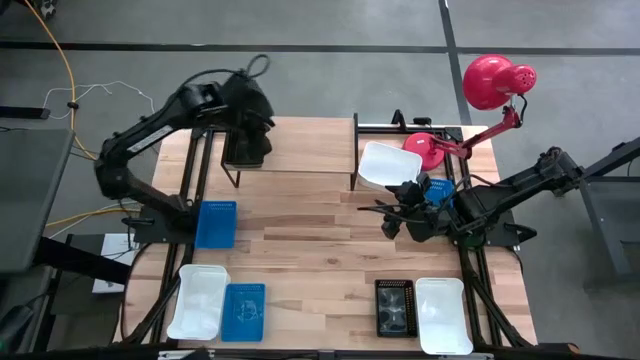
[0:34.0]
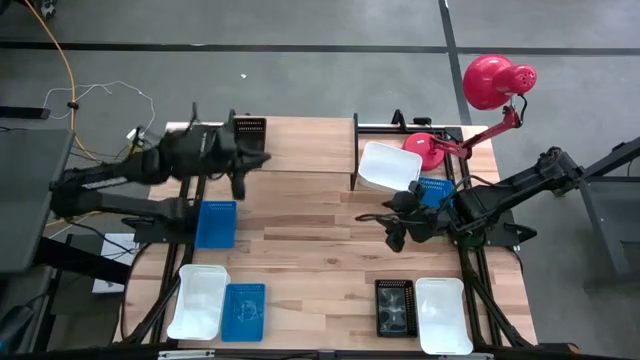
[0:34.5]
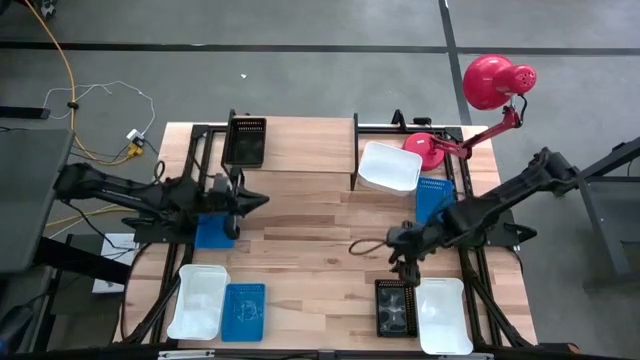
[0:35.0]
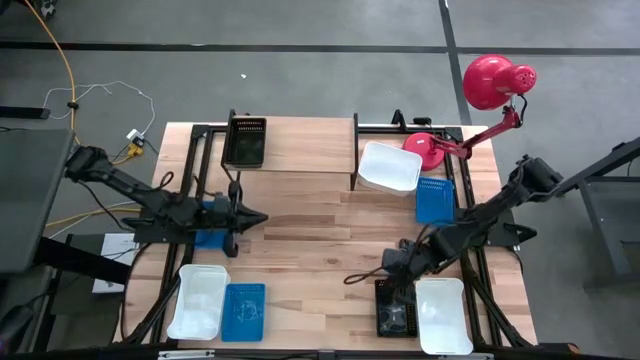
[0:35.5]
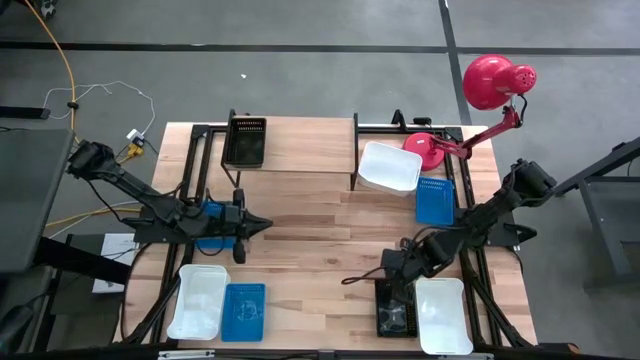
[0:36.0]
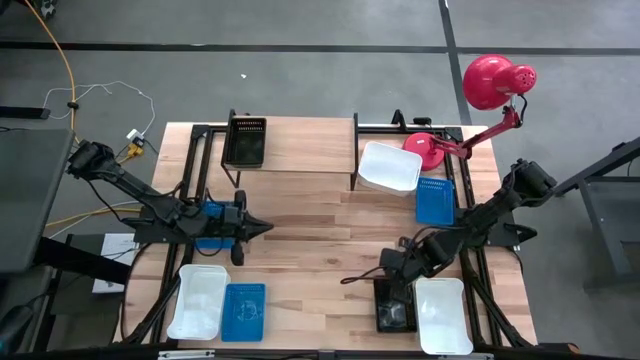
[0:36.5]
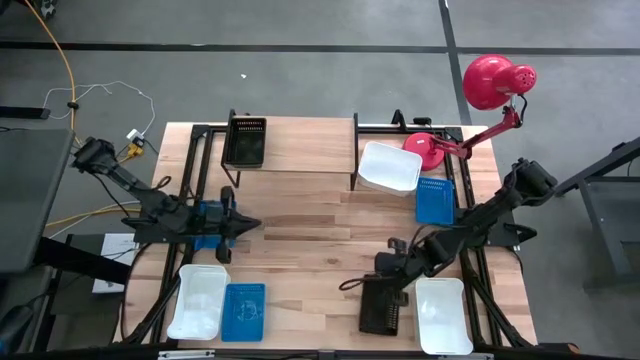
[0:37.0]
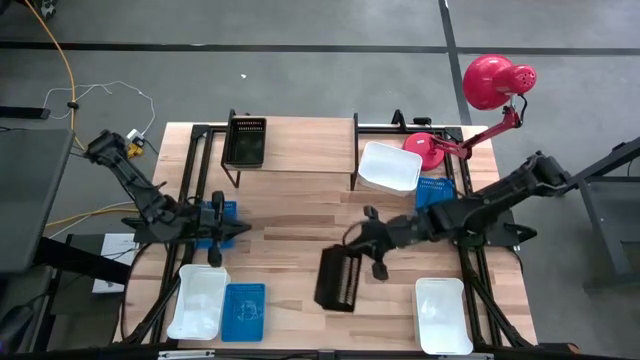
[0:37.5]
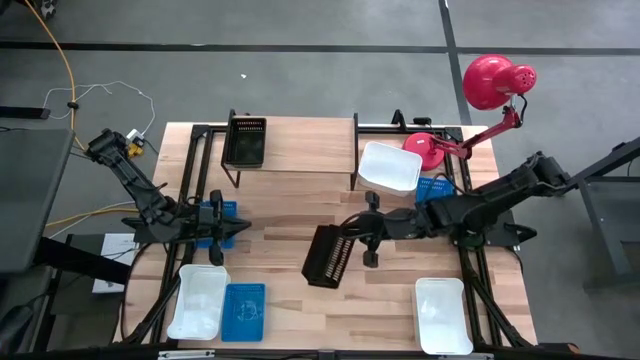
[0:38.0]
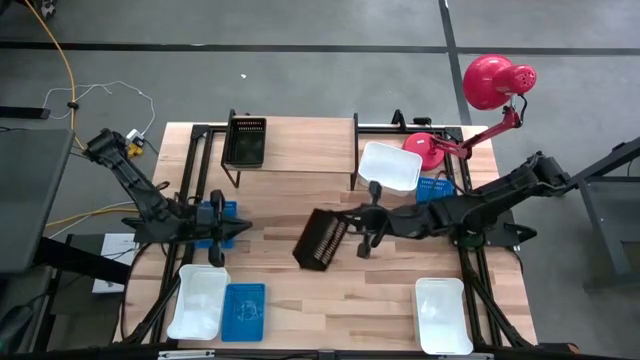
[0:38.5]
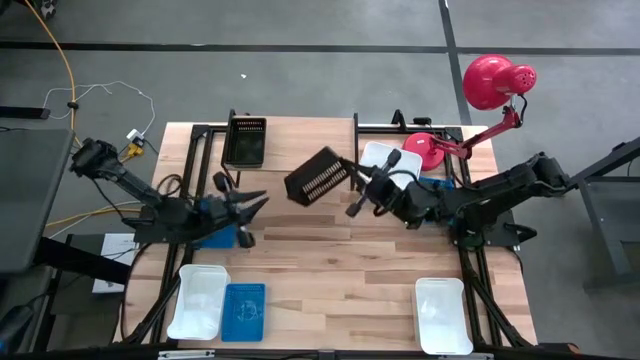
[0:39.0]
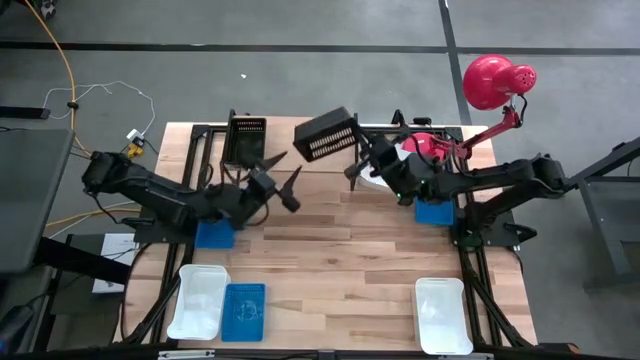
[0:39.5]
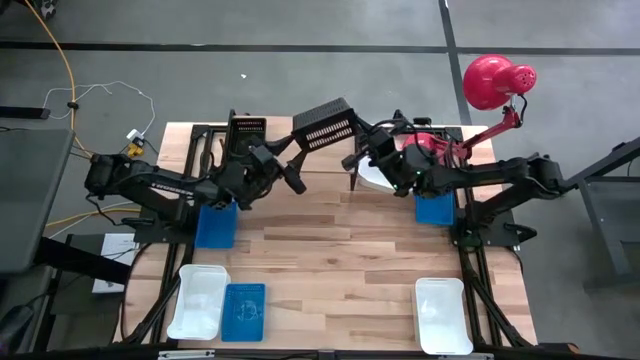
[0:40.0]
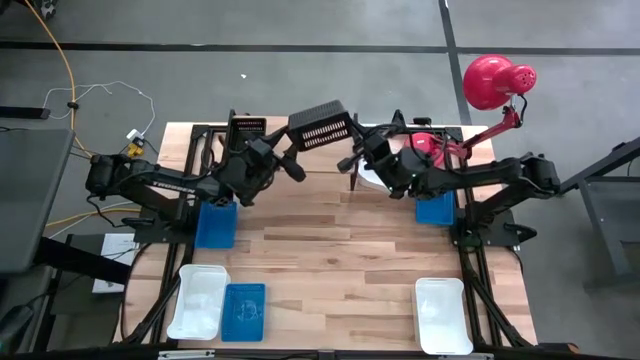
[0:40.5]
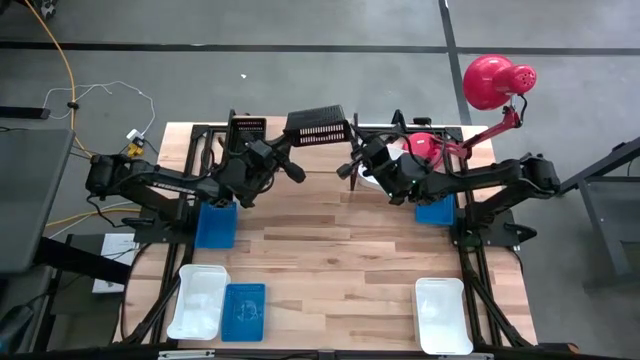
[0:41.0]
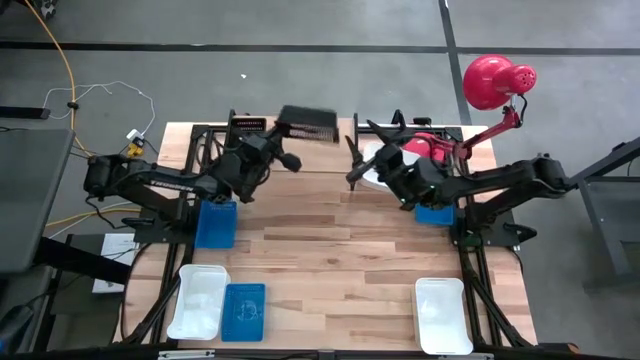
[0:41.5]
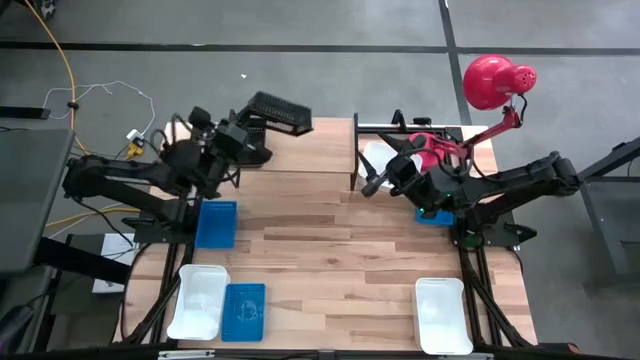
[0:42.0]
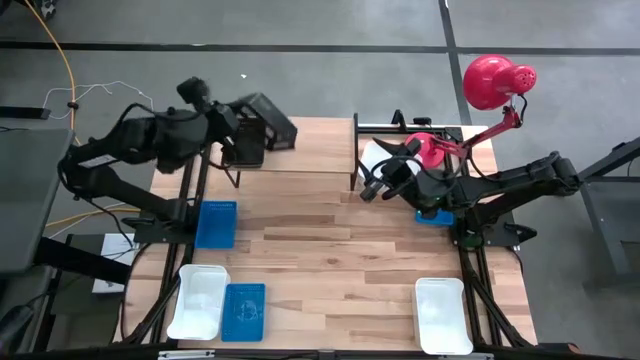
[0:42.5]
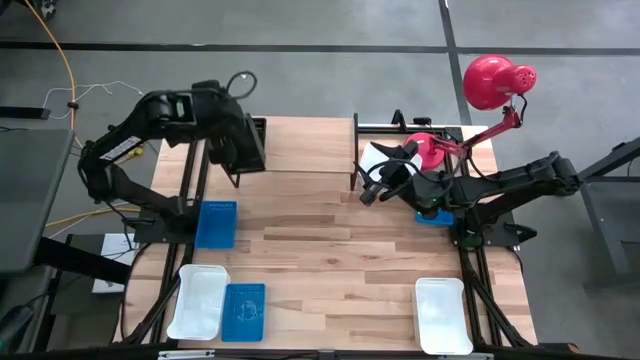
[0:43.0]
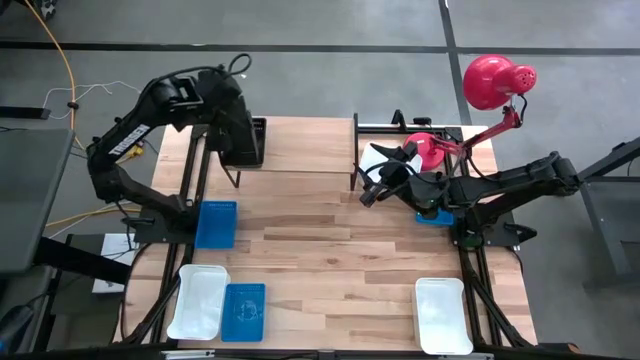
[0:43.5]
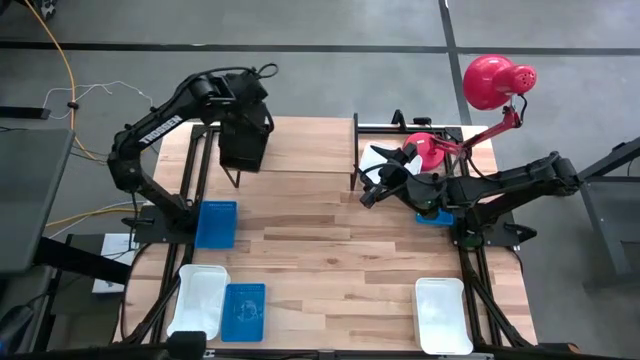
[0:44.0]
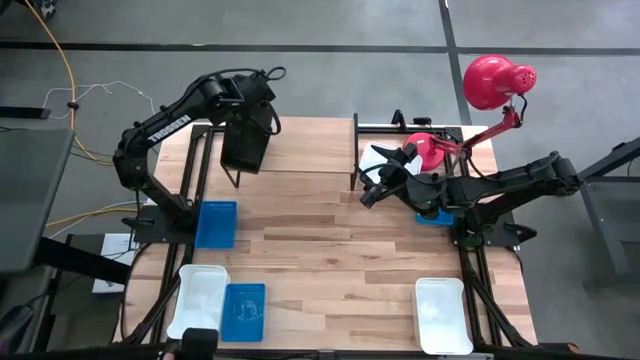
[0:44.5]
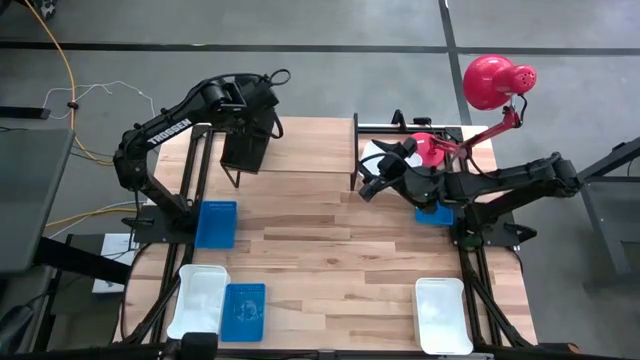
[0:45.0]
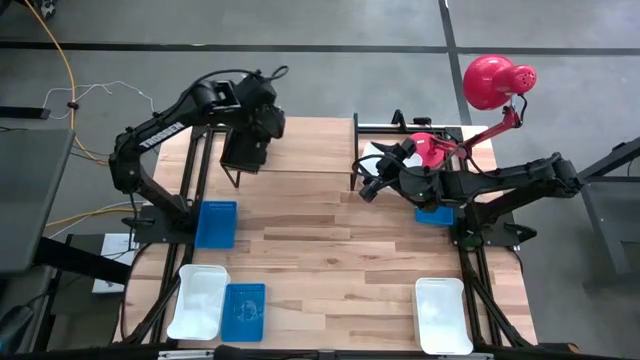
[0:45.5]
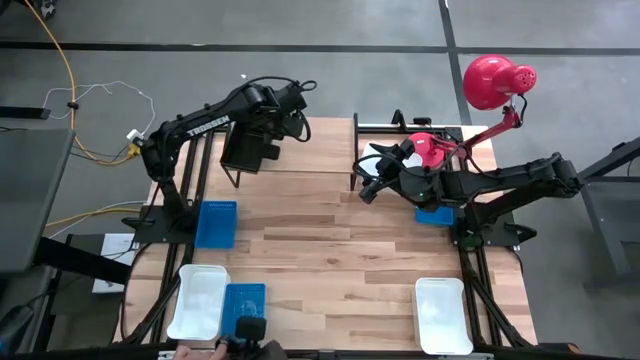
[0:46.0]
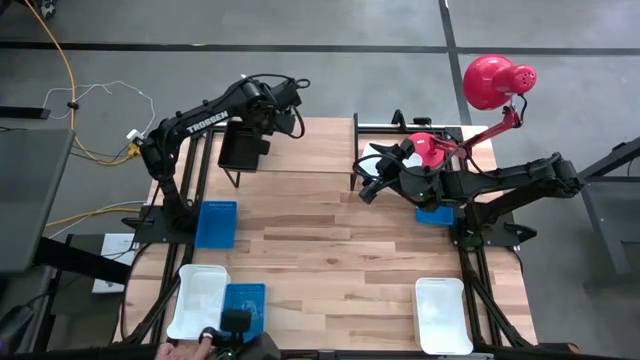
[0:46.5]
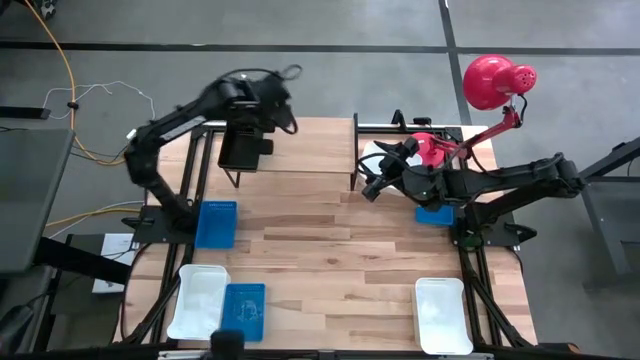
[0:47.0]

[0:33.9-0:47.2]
Task: Stack baskets on shelf by color
Stack the black bin on the black bin on the shelf

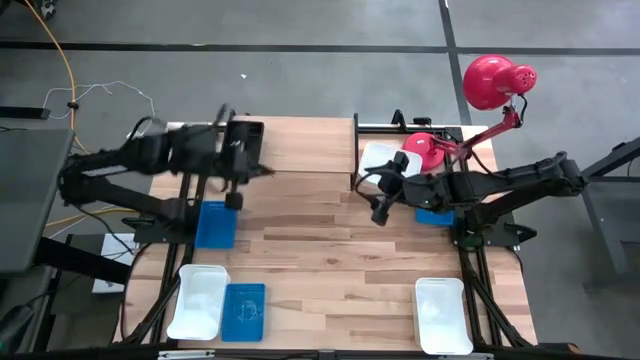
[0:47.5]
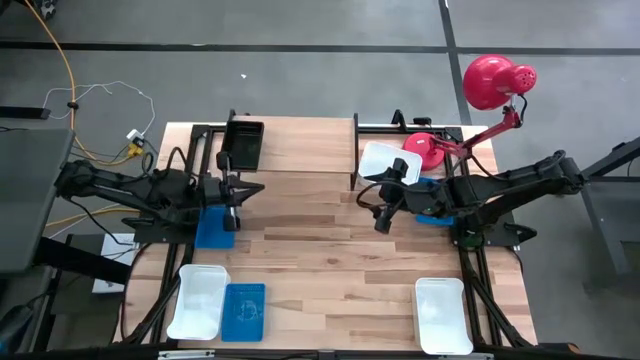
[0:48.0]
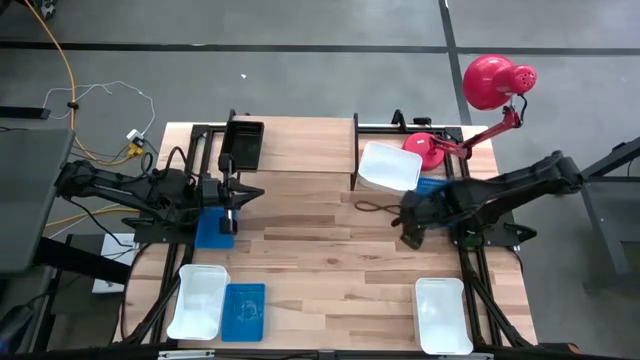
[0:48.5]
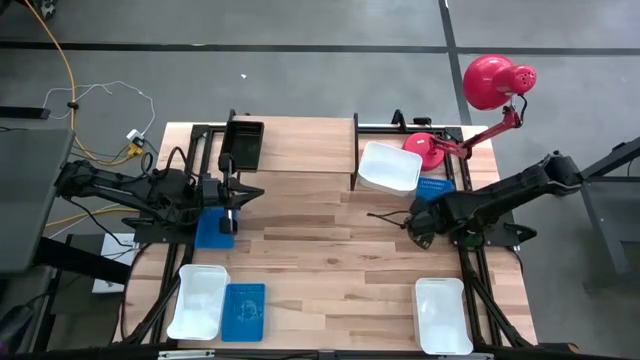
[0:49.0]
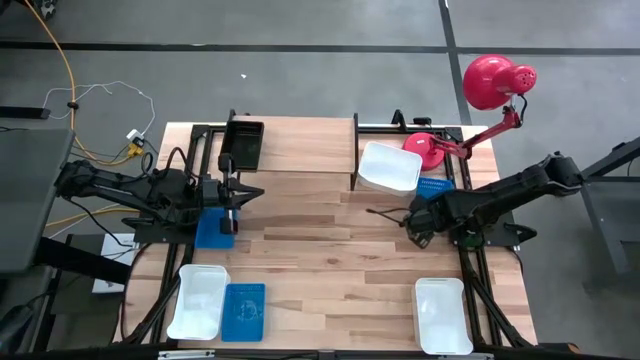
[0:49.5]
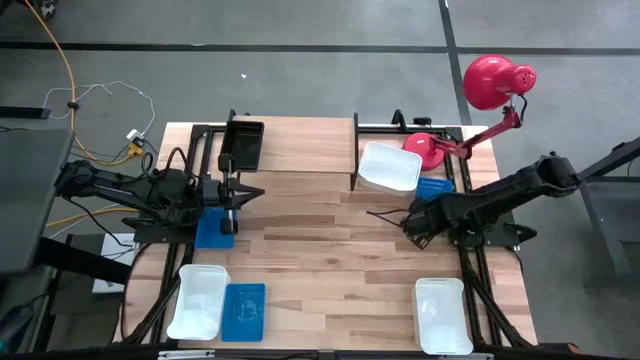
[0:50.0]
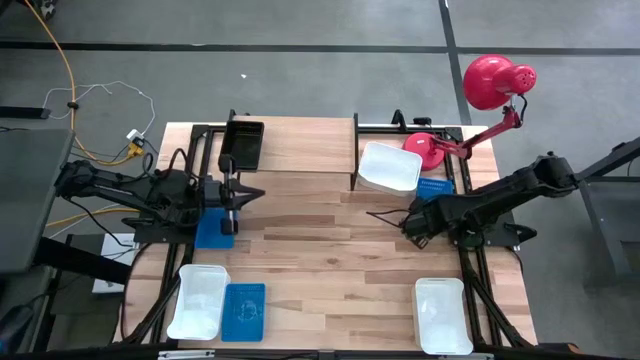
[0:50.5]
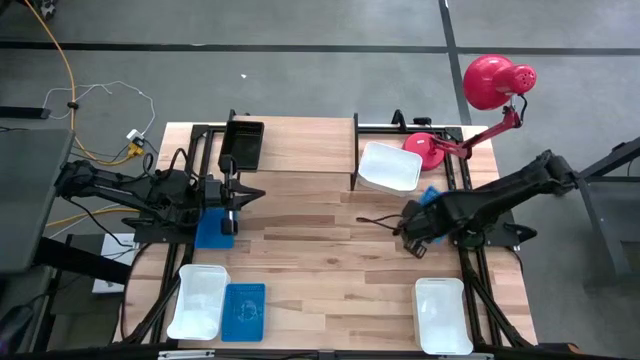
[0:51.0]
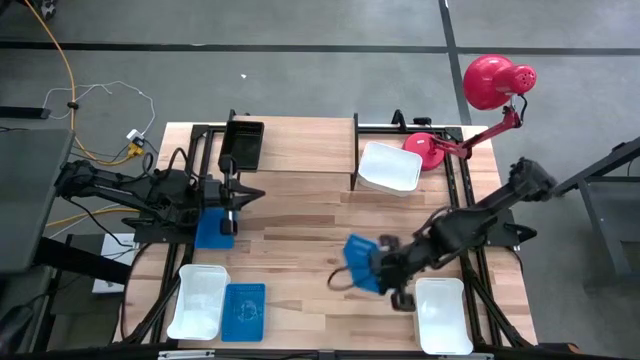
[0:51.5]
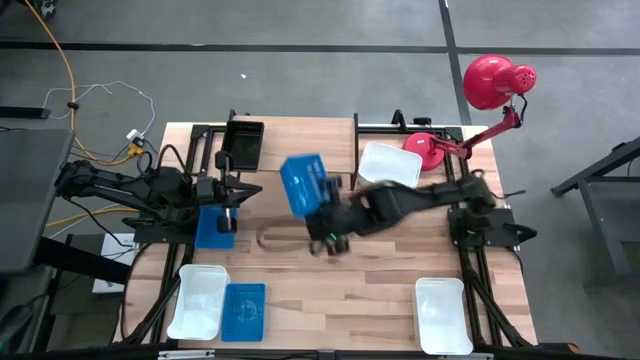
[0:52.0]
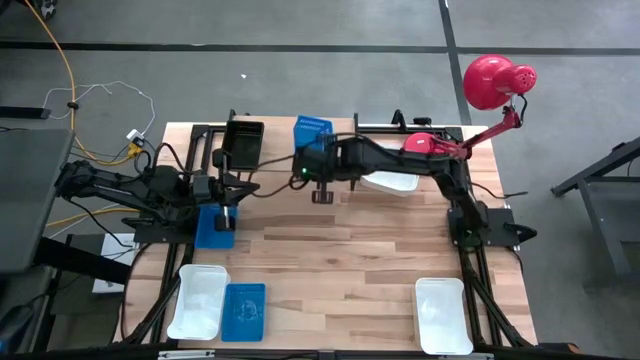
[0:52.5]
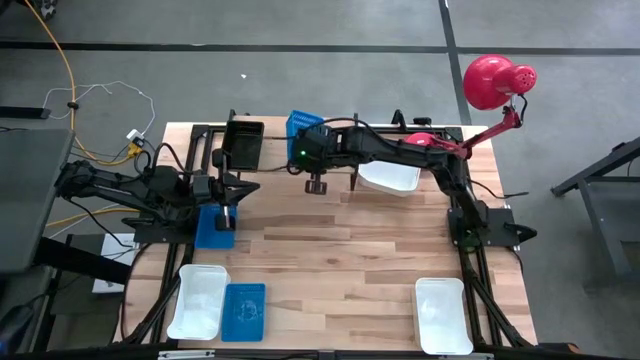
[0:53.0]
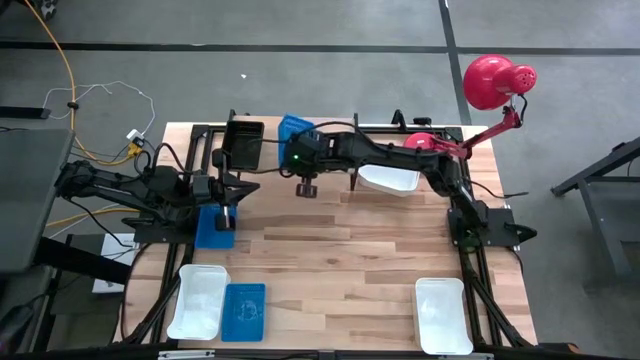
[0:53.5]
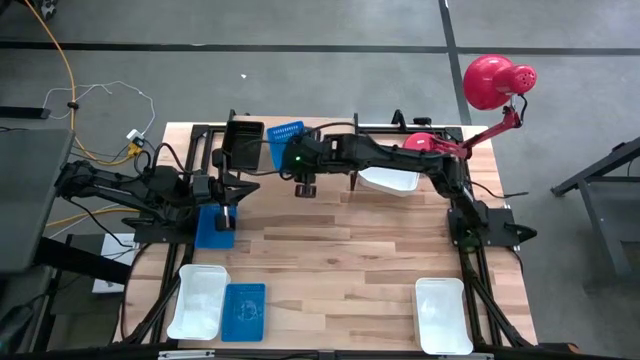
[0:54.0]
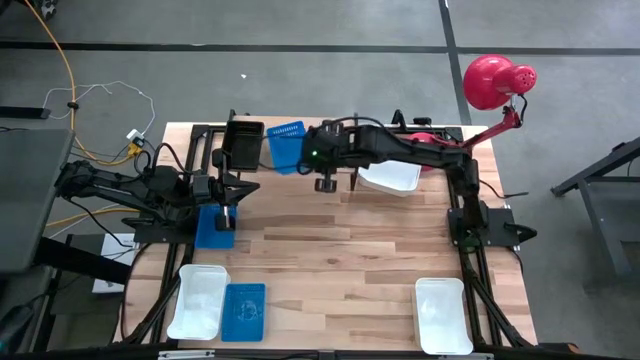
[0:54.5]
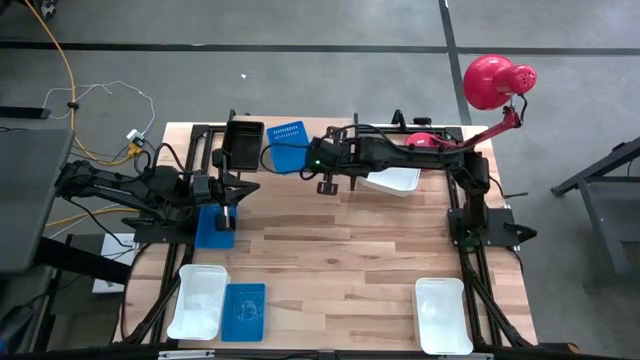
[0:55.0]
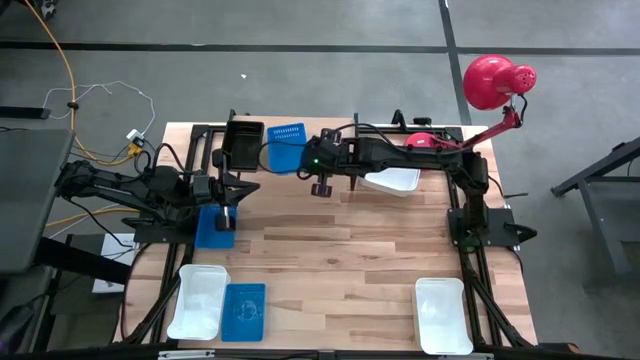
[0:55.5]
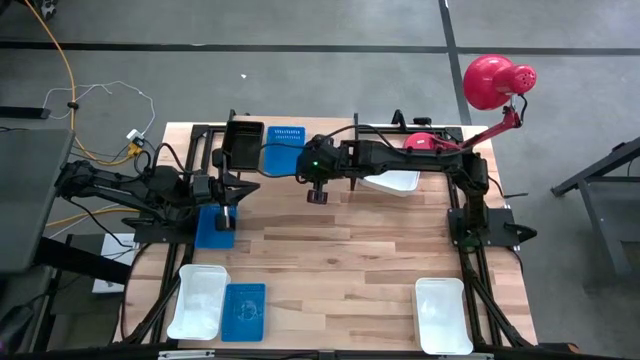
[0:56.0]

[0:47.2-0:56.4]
Put the right blue bin on the shelf
